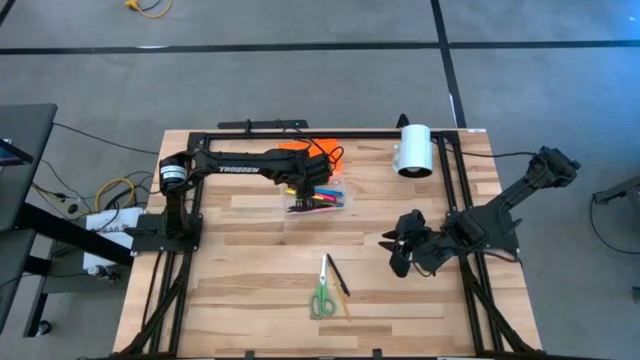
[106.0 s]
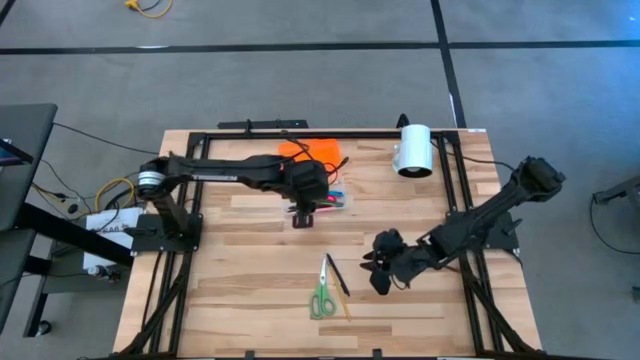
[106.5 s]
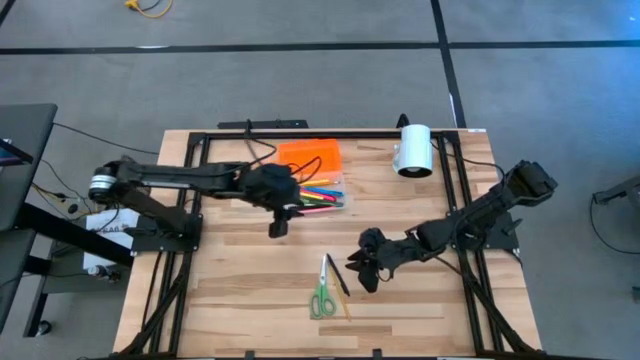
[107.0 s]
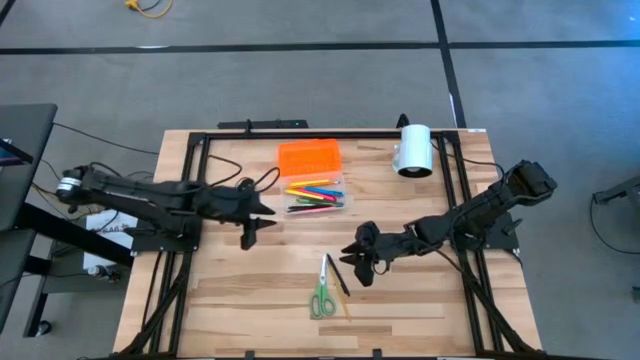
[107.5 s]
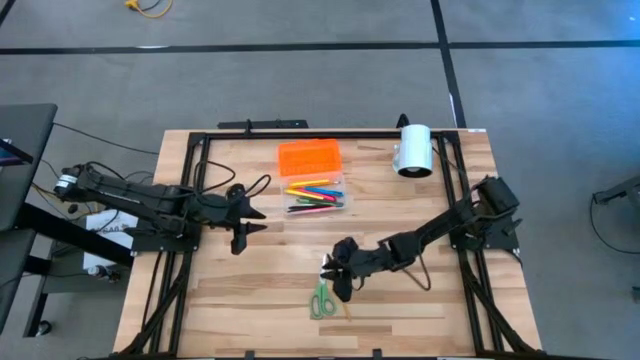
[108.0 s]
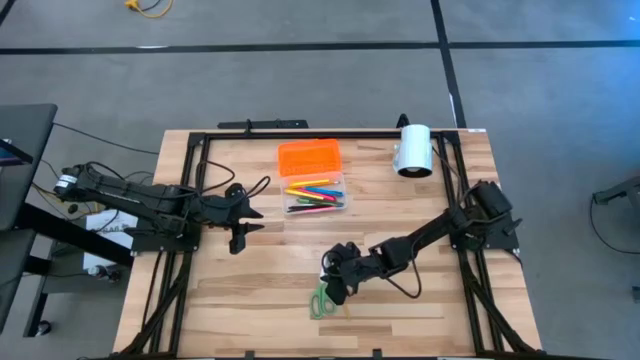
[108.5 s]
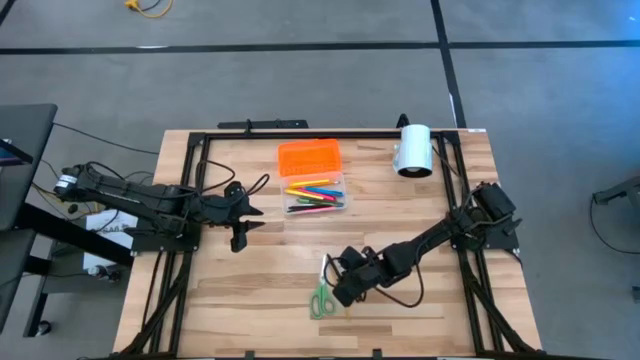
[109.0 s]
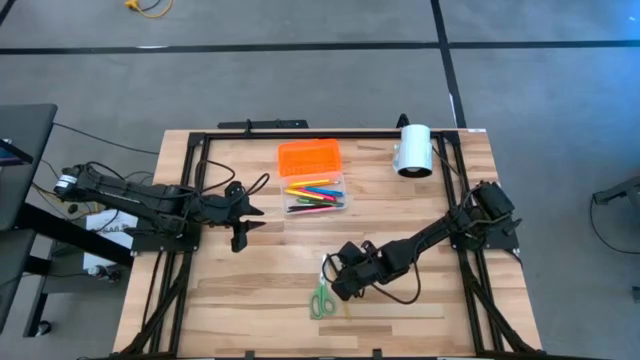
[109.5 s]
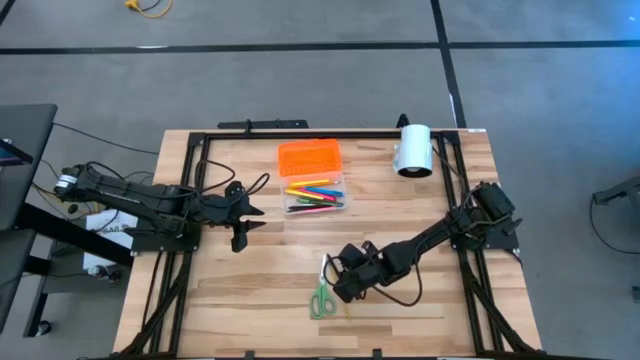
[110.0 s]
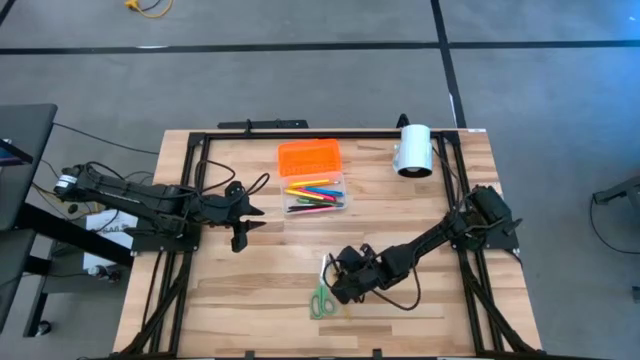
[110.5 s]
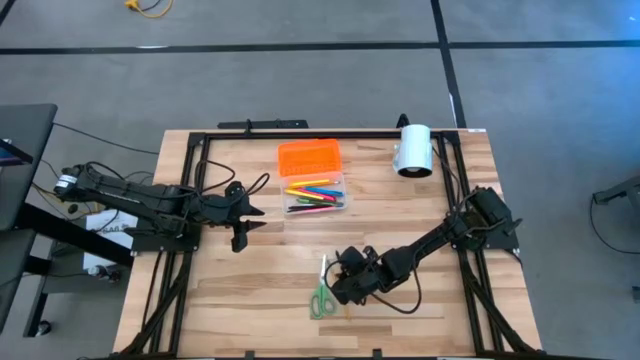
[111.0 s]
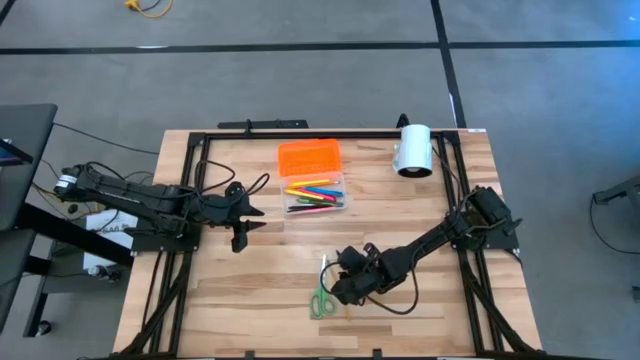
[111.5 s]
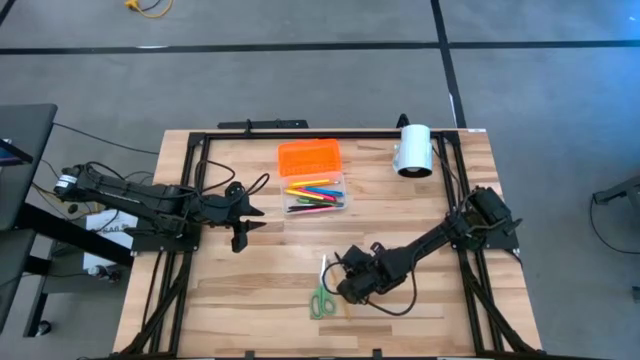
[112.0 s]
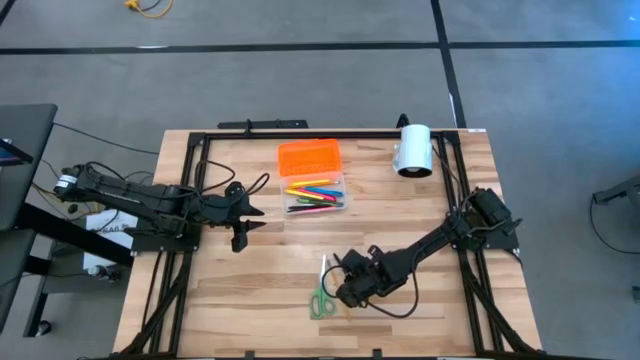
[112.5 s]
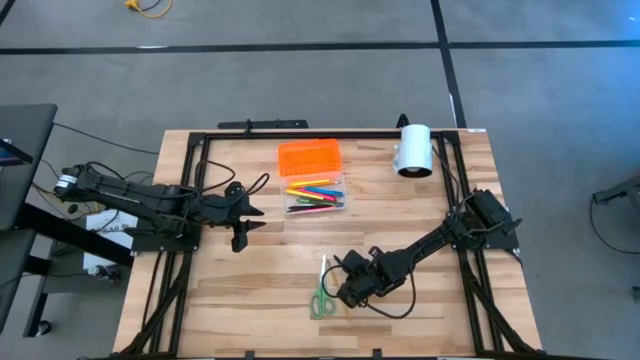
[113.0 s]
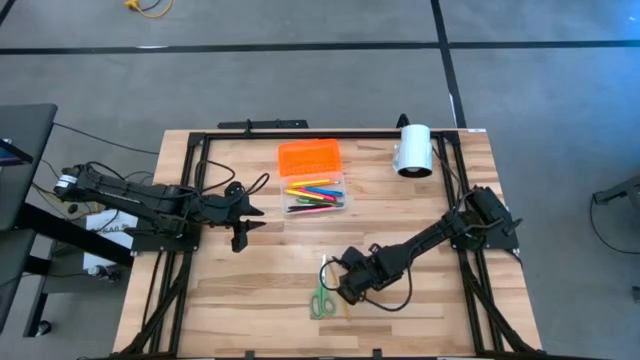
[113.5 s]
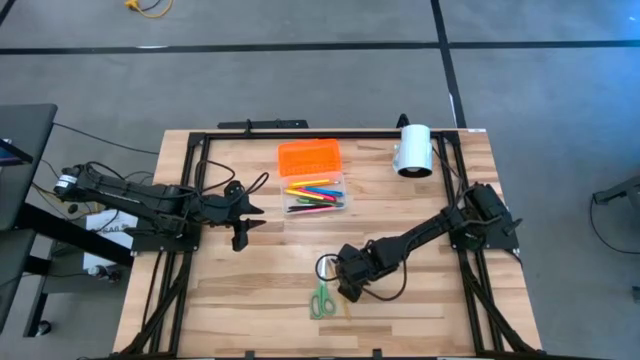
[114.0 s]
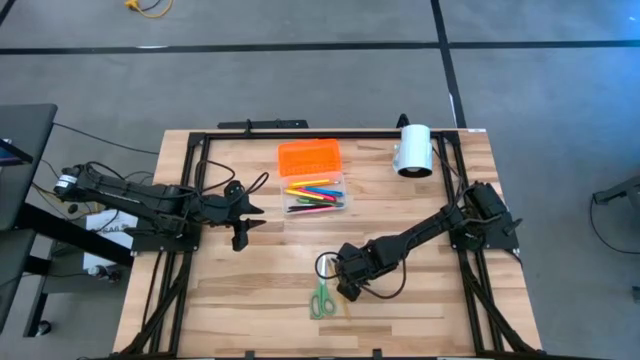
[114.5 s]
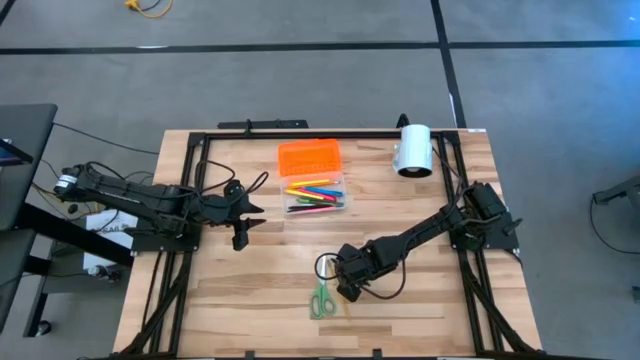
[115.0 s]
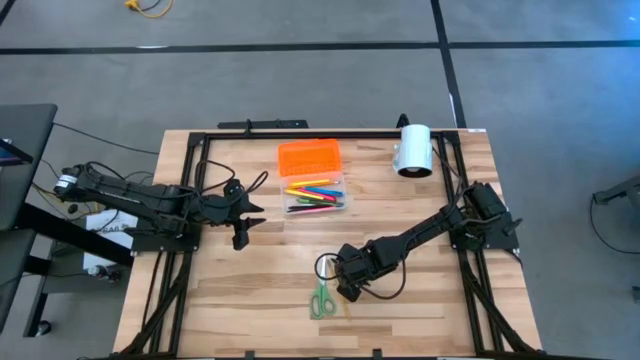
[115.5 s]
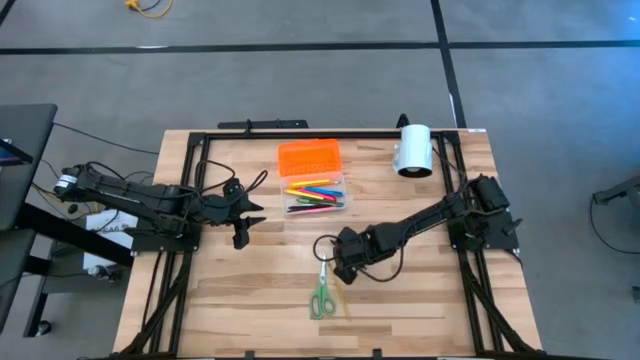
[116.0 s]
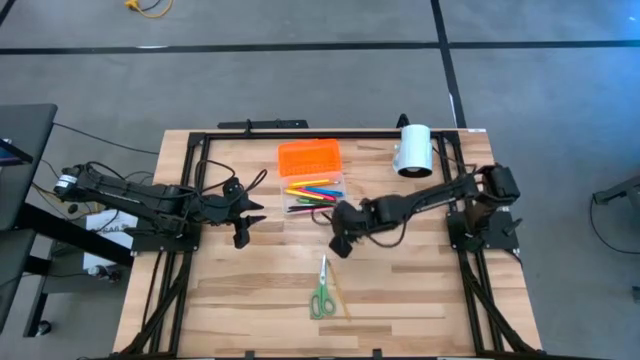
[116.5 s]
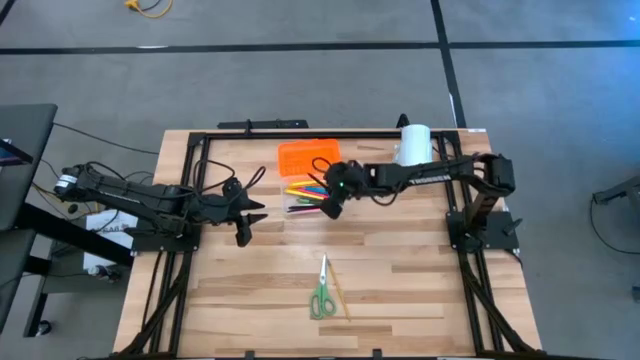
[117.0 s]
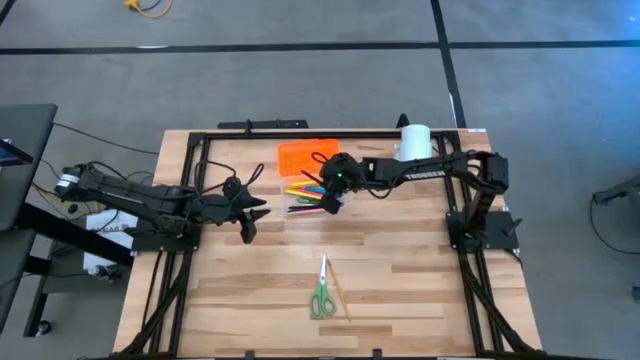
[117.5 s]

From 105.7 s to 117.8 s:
Task: Pick & place school supplies into a supply box
Put the black pen into the supply box

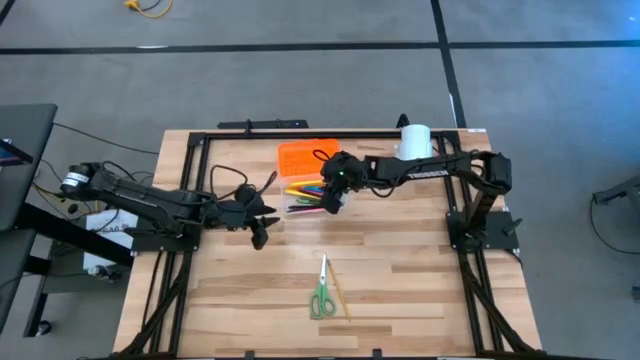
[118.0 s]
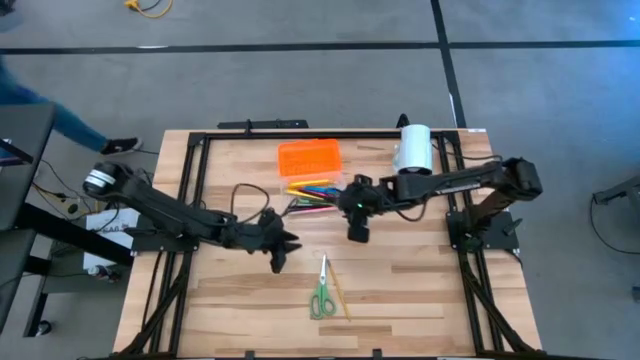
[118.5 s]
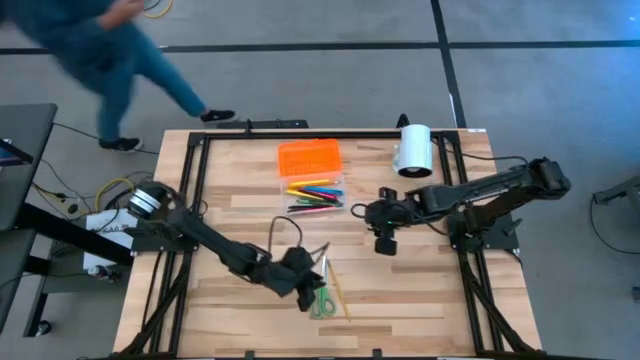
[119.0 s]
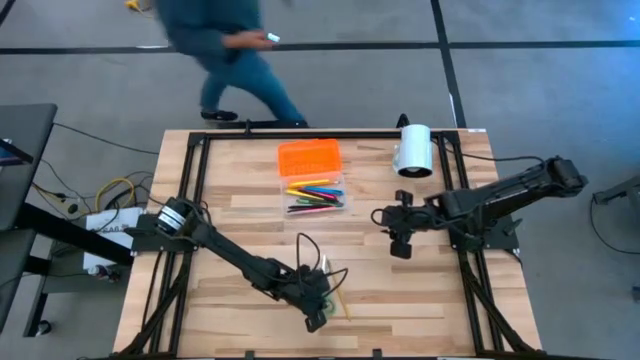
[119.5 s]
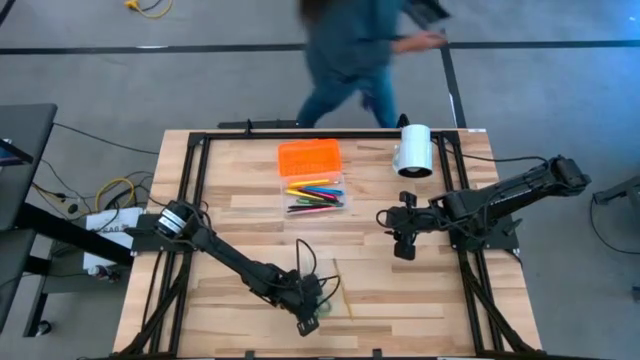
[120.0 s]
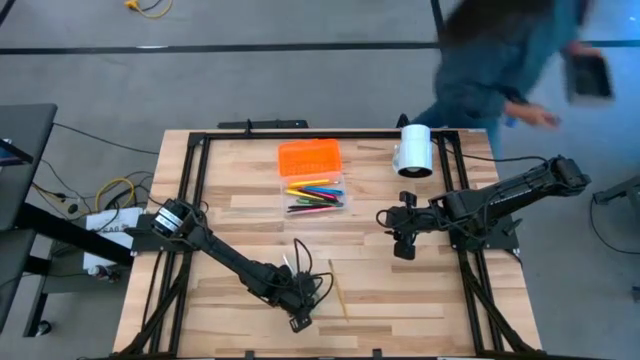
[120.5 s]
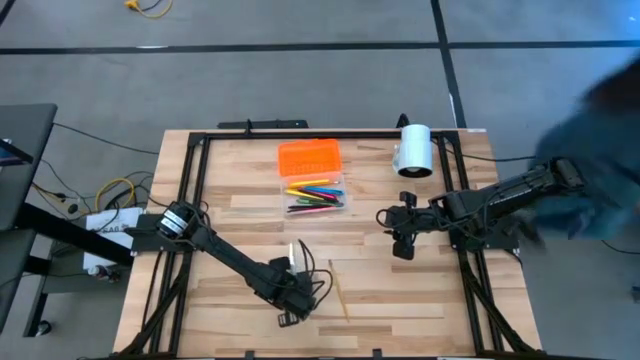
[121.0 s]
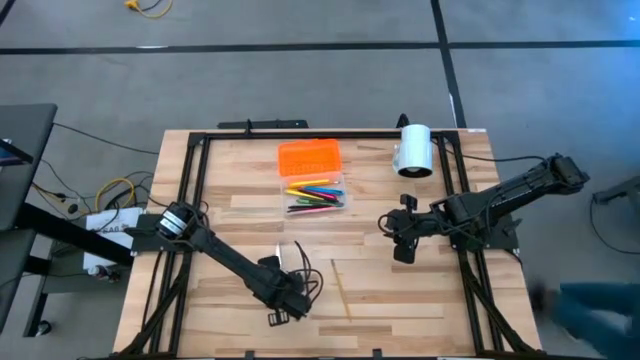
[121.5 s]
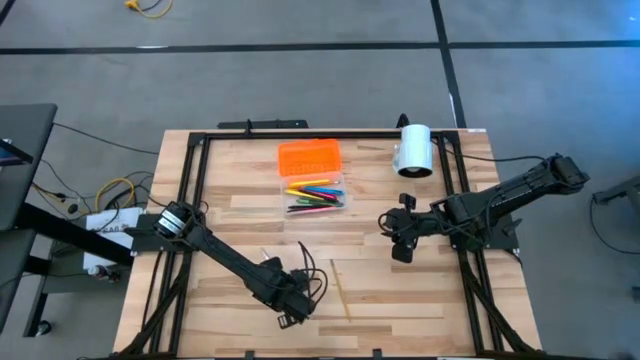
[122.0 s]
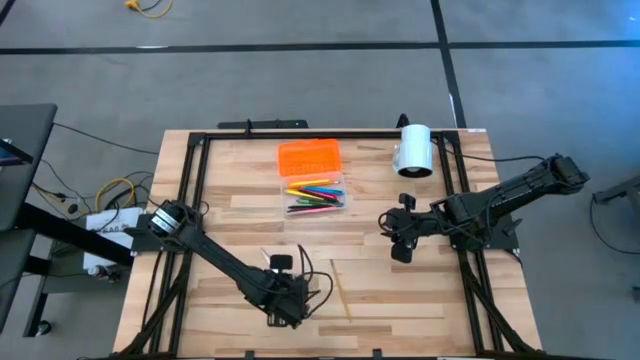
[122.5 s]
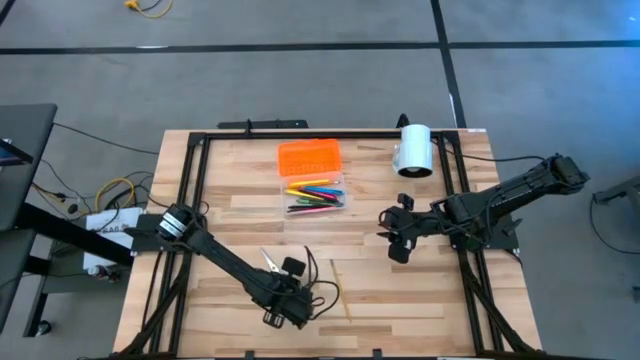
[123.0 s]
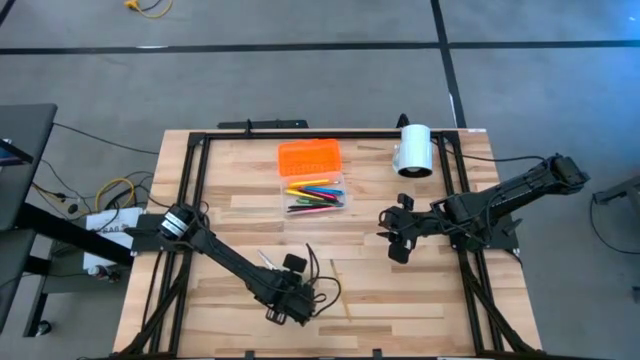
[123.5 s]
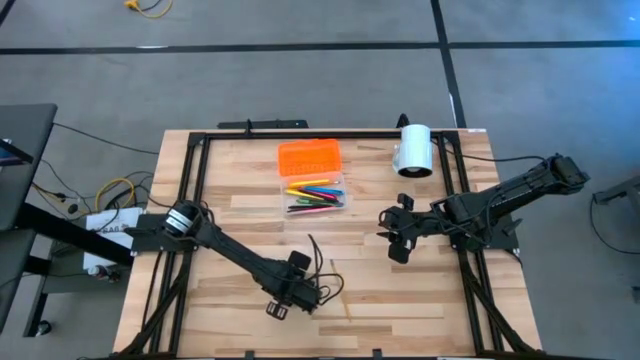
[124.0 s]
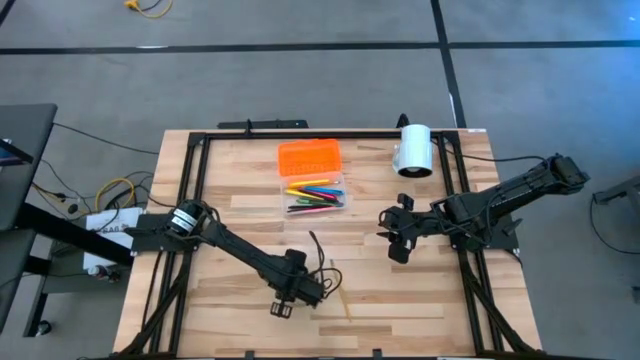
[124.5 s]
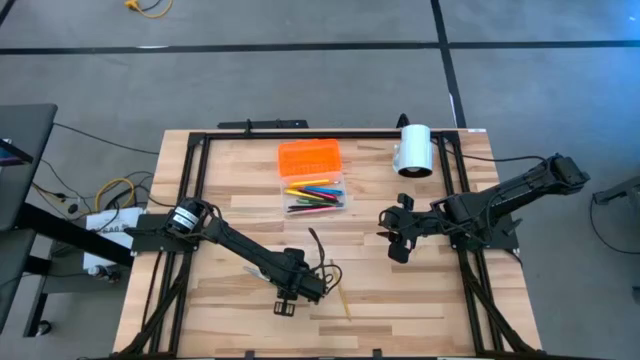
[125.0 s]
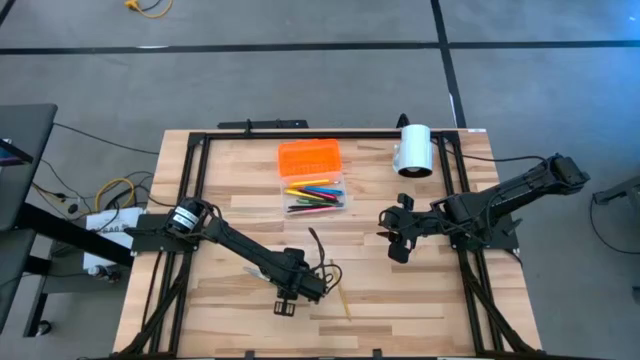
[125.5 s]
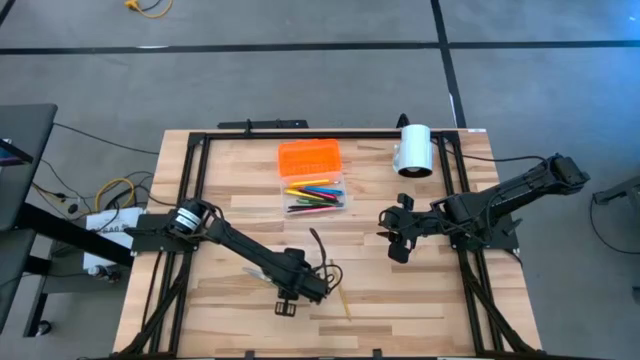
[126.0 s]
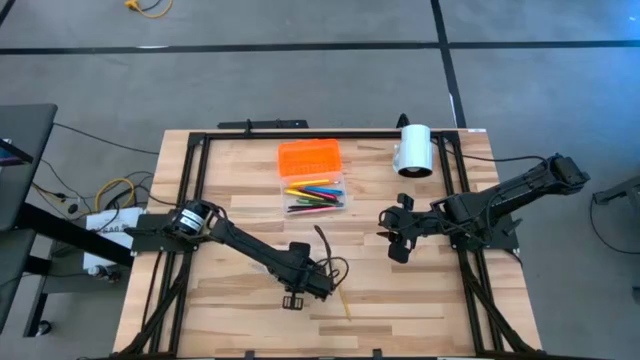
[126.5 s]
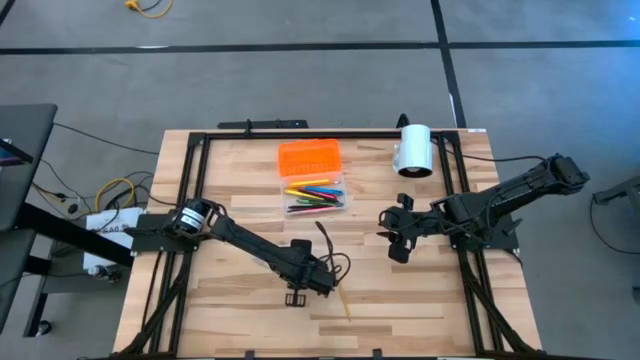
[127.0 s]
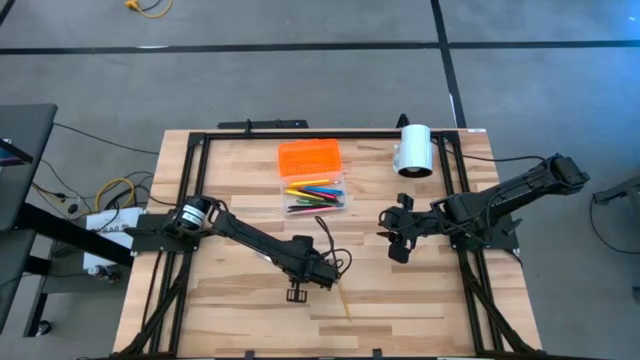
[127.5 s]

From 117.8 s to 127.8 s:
Put the green scissors into the supply box

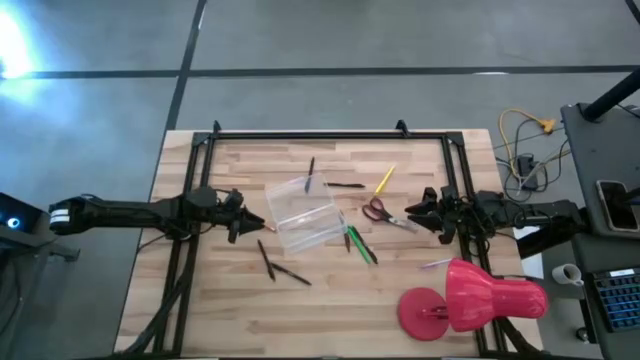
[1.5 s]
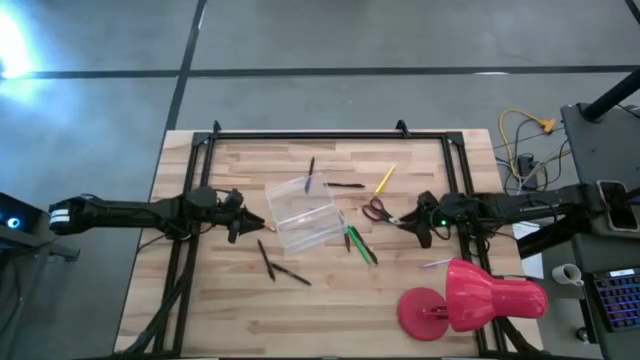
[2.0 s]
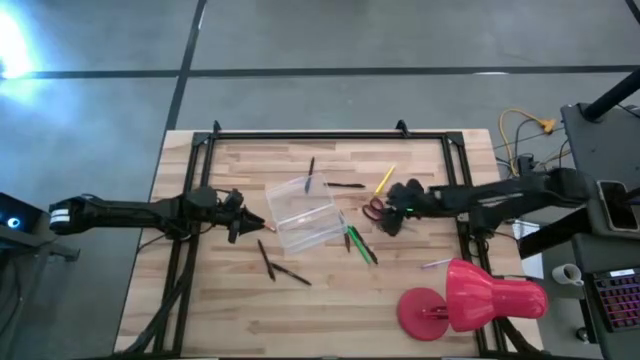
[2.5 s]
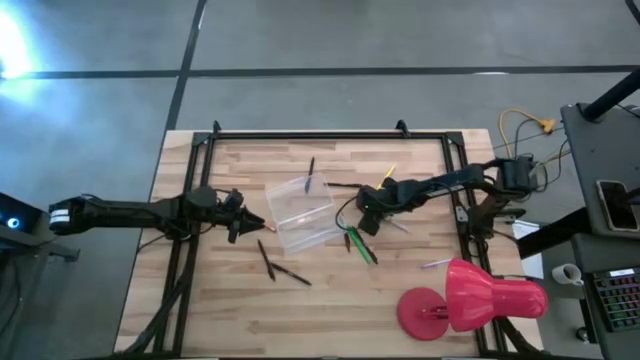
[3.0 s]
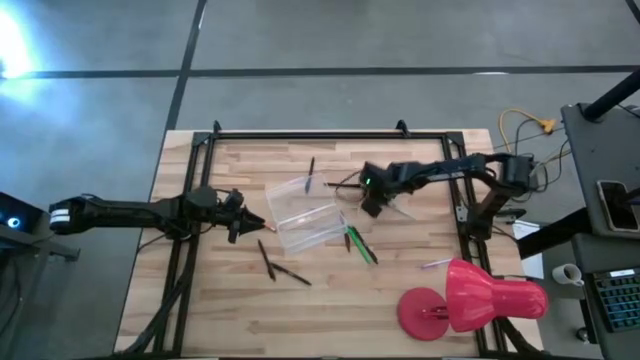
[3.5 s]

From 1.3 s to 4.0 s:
Task: Pick & place school supplies into a supply box
Put the scissors into the stationery box
